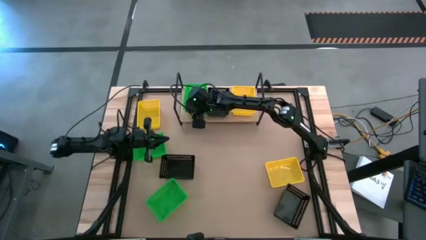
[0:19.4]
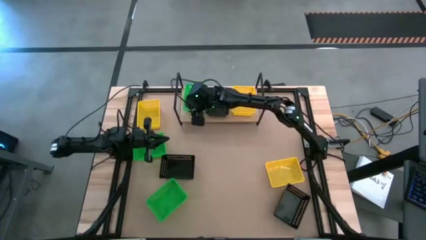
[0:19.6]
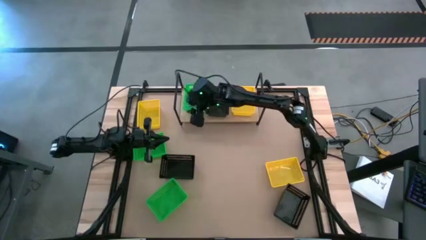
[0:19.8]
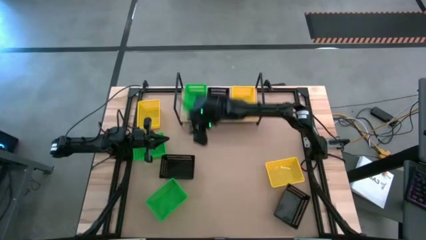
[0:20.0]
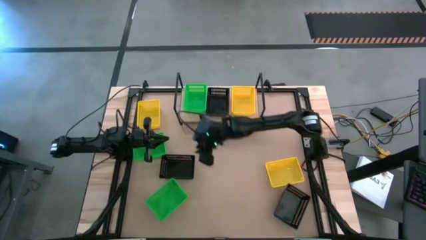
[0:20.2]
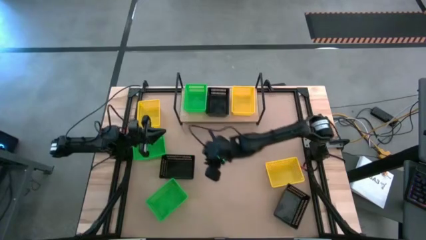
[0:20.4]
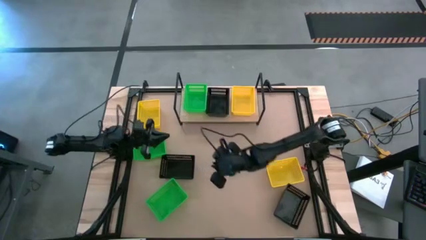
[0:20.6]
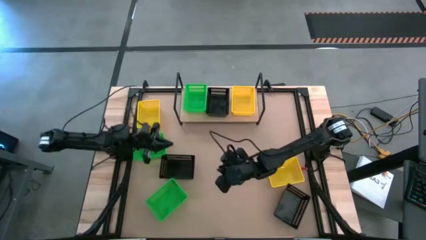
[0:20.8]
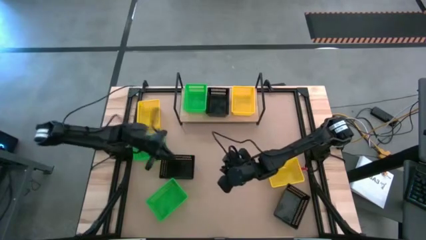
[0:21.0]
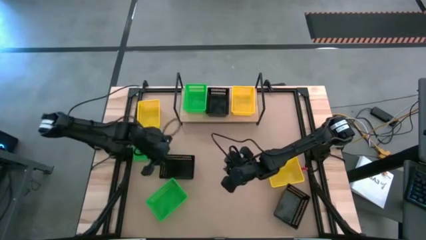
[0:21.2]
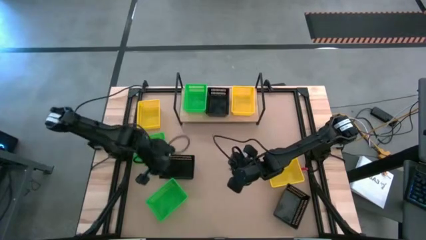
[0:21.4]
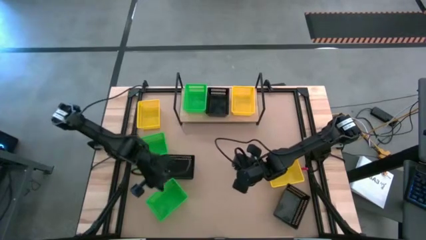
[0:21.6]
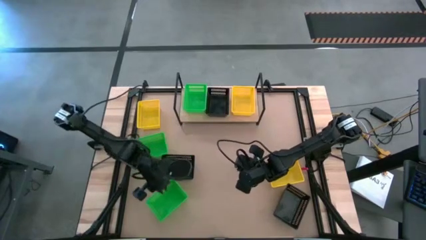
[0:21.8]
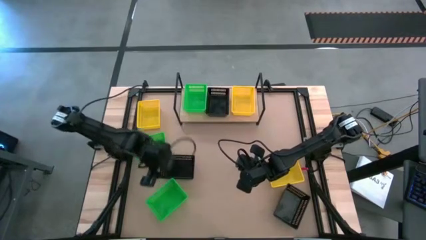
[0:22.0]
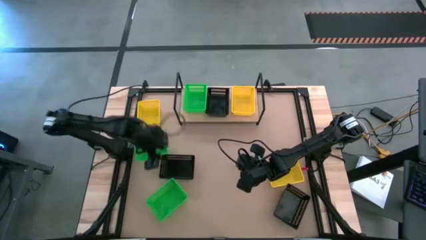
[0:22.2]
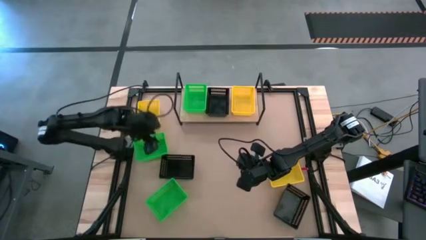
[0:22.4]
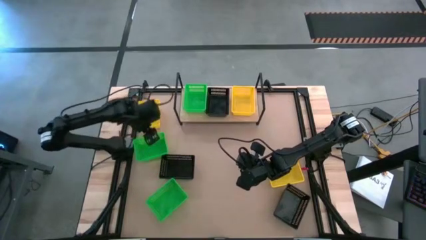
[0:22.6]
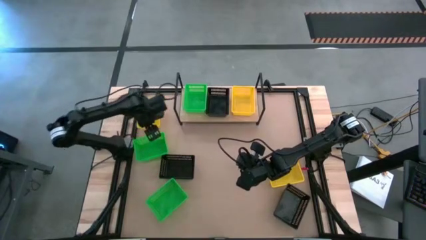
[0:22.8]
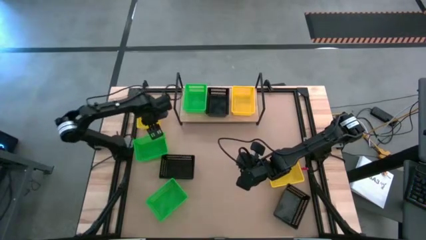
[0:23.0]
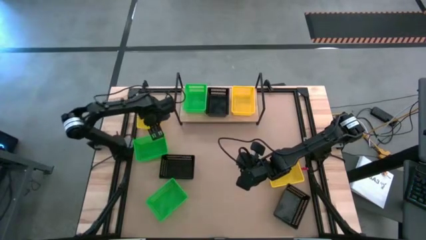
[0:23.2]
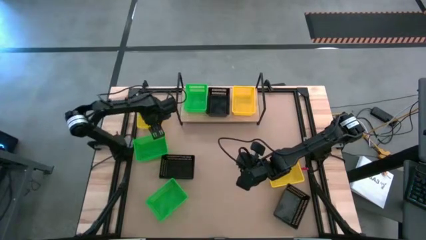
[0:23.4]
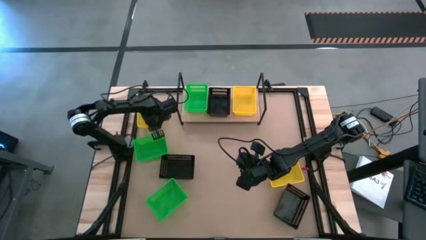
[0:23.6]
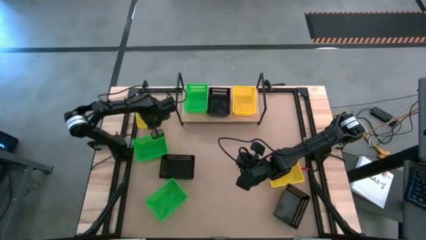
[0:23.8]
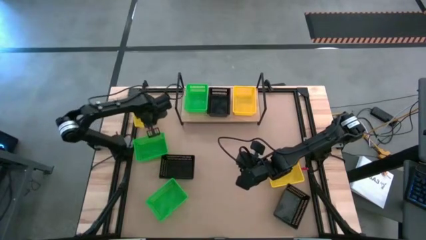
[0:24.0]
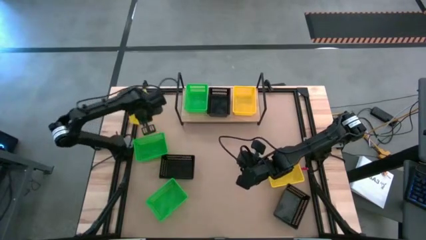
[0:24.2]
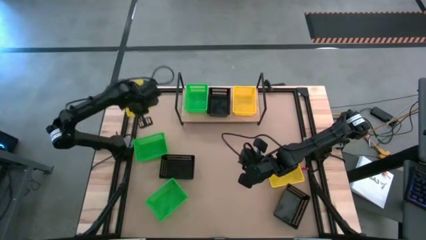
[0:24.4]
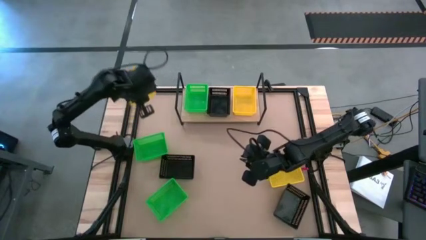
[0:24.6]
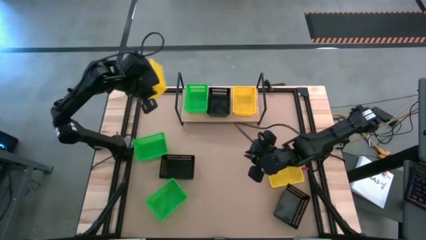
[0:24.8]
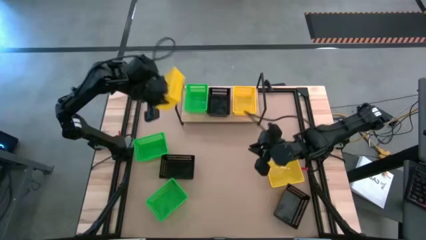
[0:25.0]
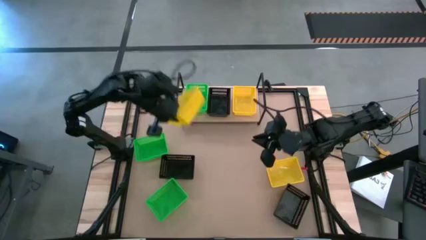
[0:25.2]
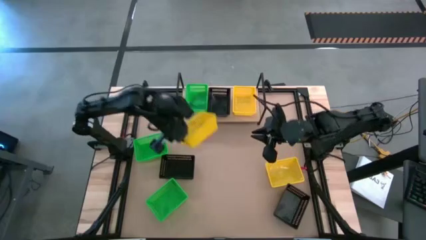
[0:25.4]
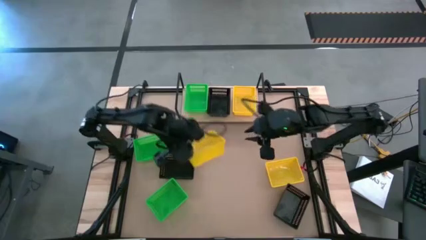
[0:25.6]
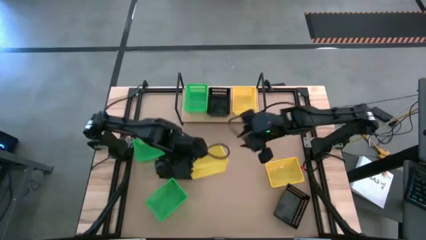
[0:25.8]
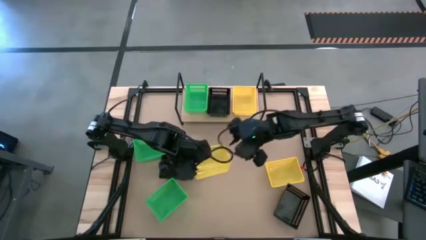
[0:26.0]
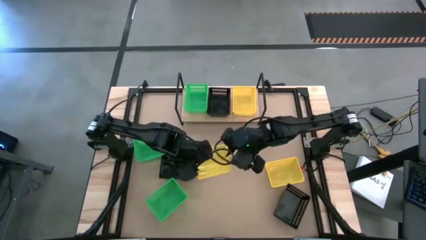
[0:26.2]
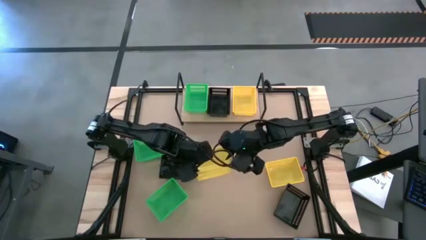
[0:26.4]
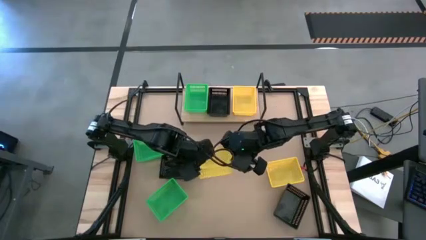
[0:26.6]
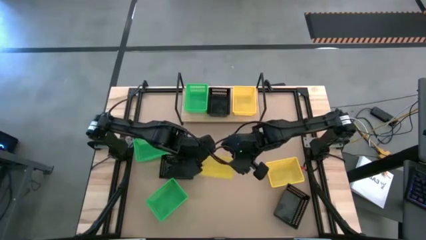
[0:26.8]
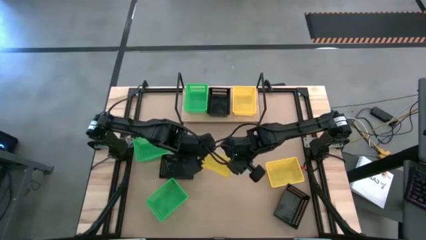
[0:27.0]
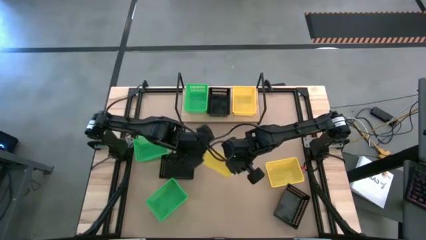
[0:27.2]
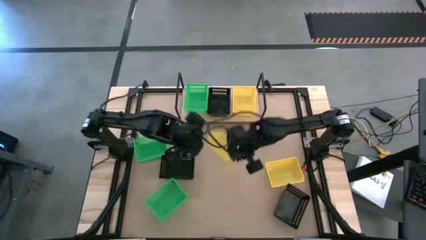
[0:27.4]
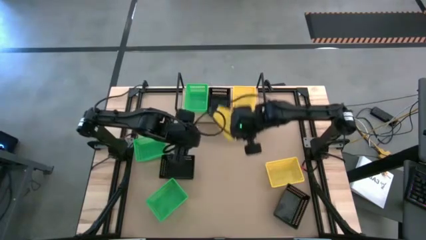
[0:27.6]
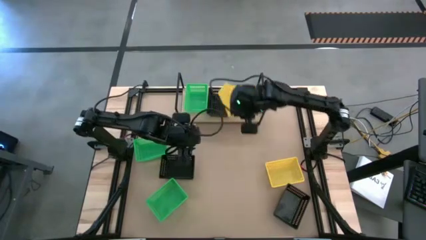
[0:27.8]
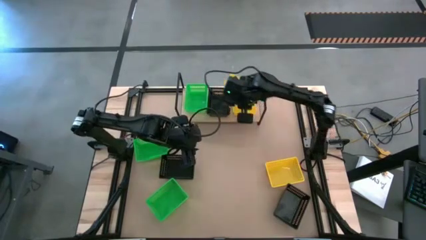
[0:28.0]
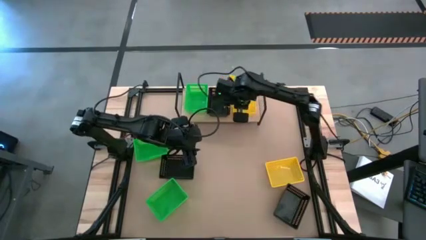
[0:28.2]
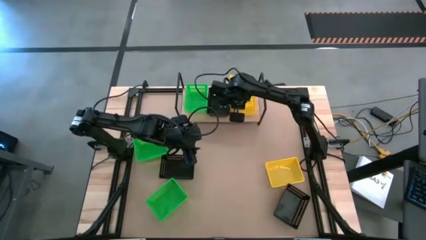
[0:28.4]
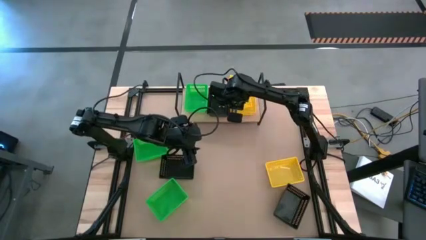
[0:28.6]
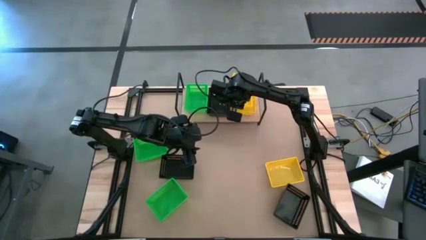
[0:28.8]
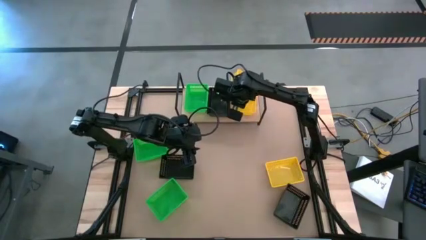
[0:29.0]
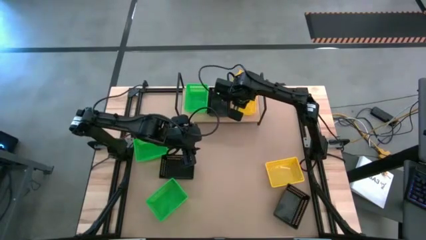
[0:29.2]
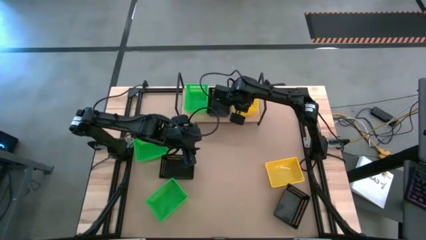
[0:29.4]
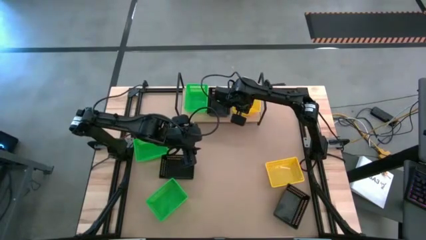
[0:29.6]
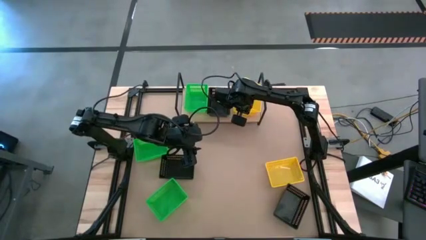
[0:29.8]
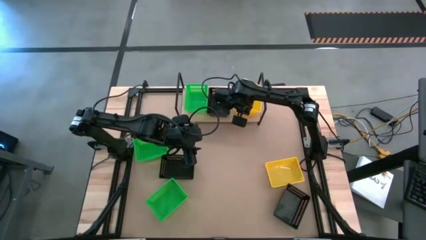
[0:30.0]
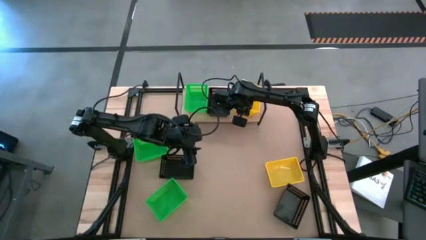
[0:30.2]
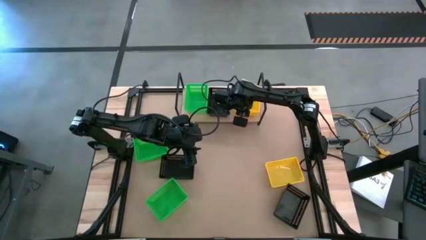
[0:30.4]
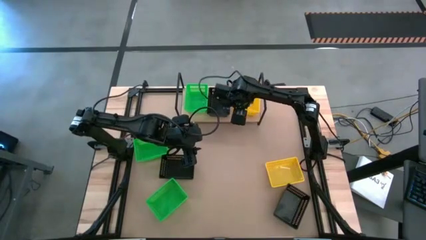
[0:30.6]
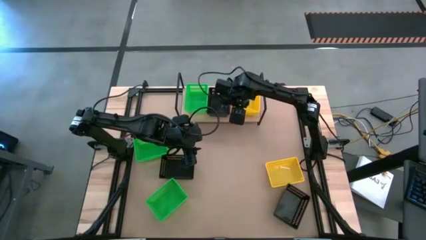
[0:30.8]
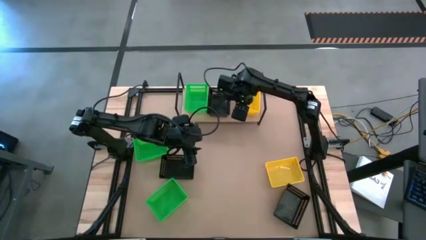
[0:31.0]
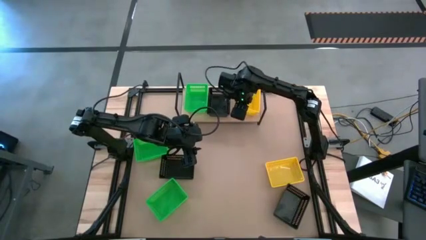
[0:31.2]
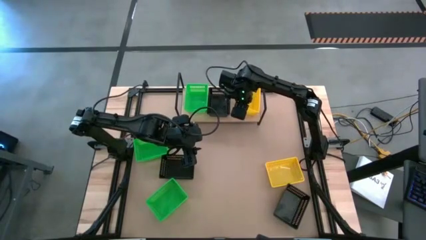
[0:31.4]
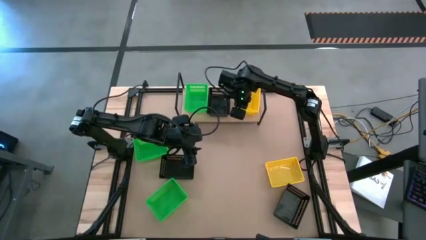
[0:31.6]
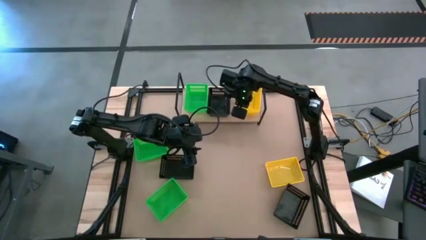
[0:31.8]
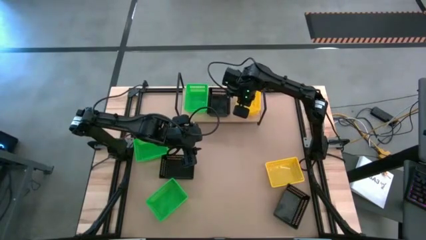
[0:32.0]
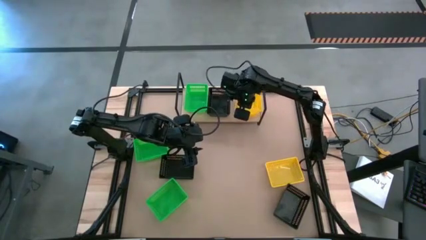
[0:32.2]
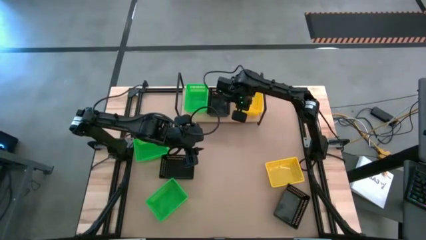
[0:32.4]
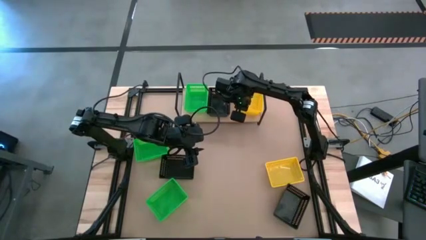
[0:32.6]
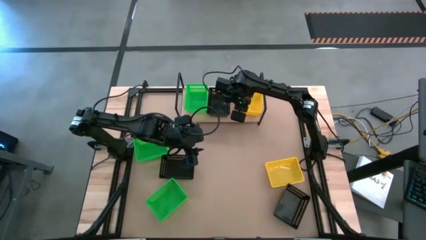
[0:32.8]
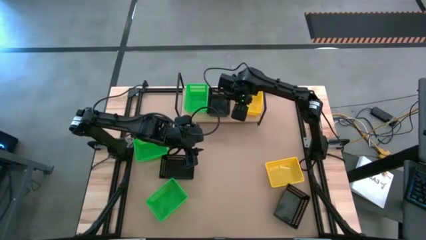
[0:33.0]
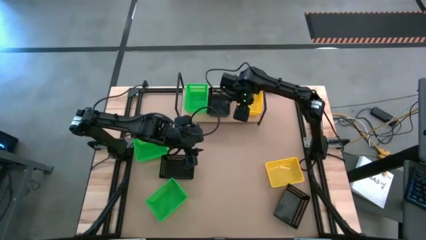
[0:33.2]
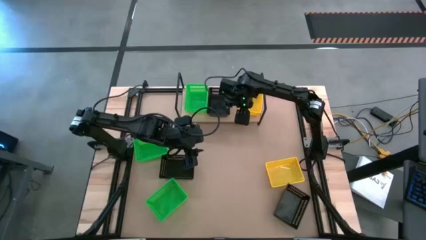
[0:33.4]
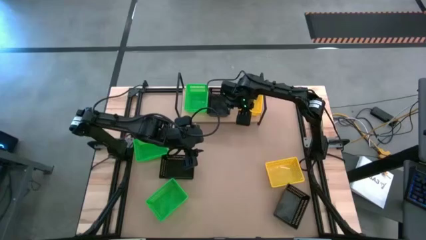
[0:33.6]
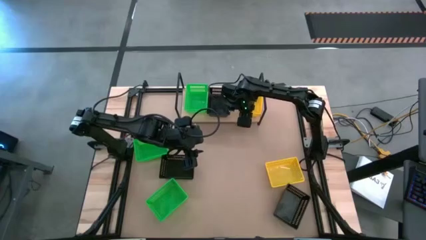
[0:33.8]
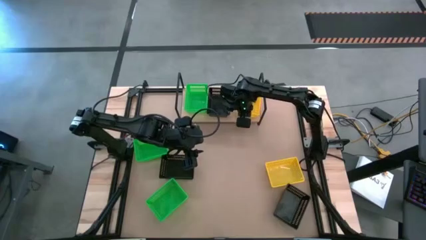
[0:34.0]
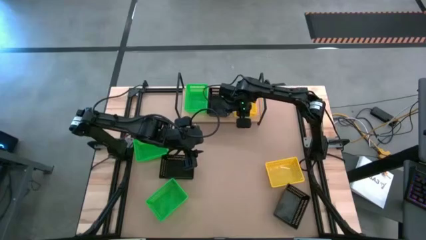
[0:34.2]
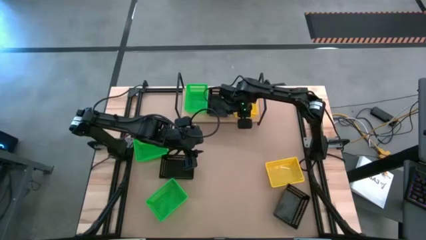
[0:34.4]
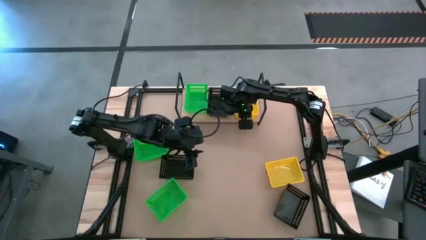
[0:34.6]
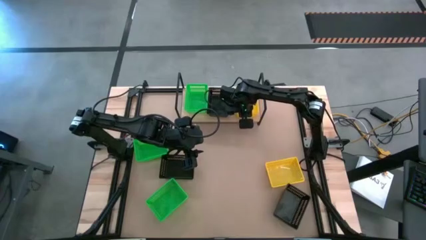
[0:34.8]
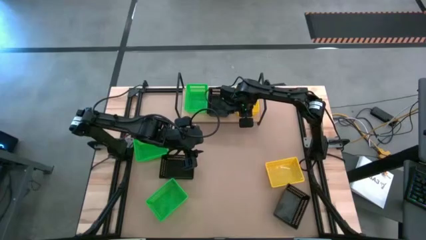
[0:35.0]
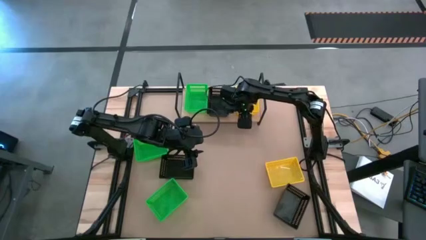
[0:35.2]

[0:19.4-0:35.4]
Task: Stack baskets on shelf by color
Stack the left yellow basket on top of the yellow basket on the shelf
